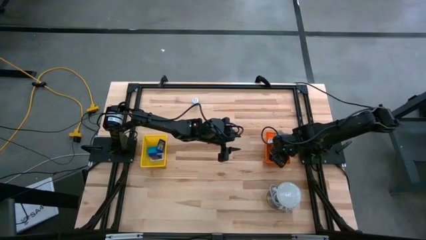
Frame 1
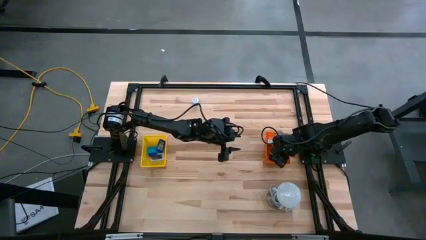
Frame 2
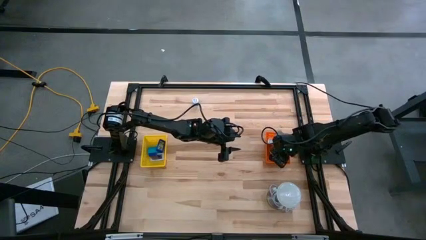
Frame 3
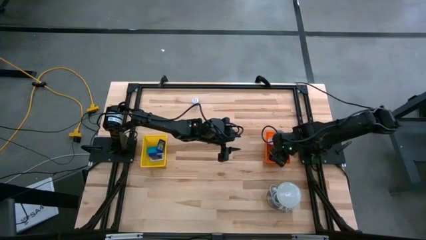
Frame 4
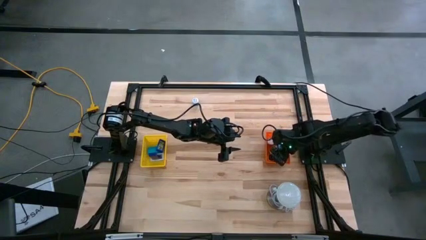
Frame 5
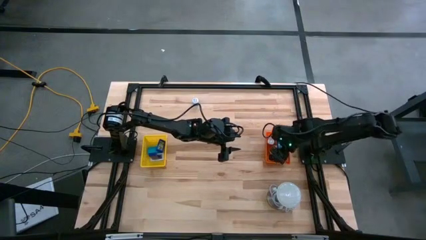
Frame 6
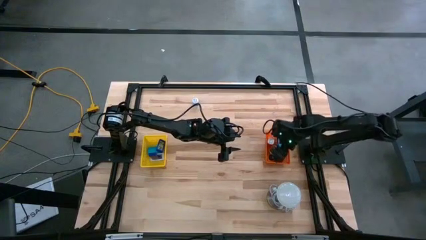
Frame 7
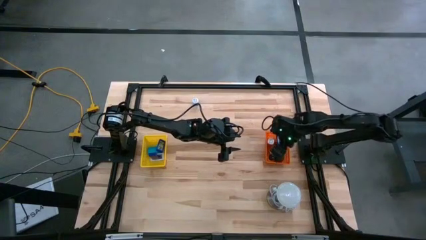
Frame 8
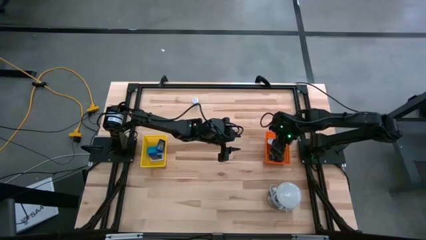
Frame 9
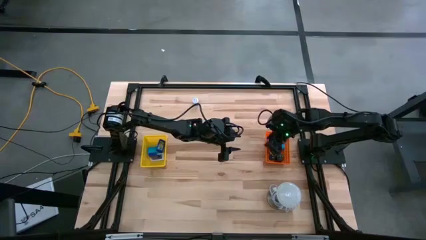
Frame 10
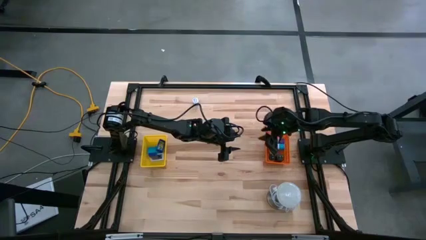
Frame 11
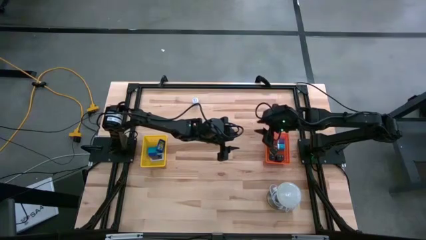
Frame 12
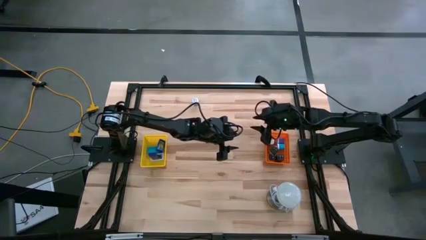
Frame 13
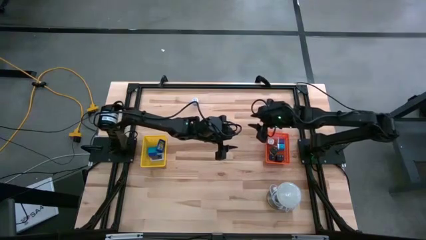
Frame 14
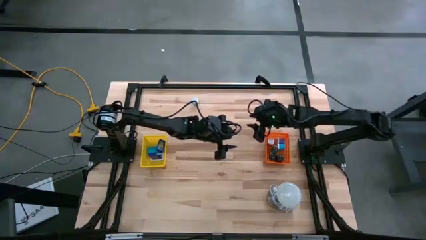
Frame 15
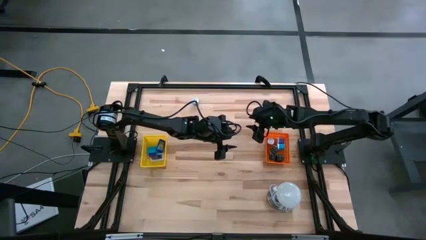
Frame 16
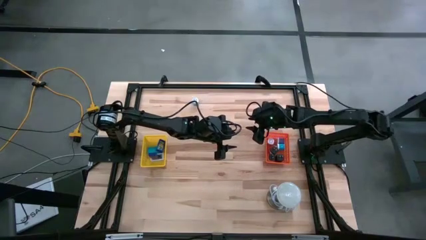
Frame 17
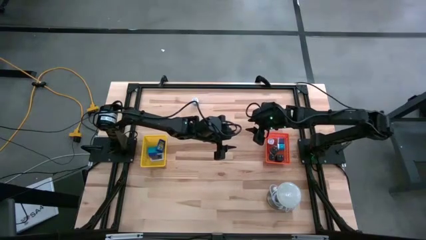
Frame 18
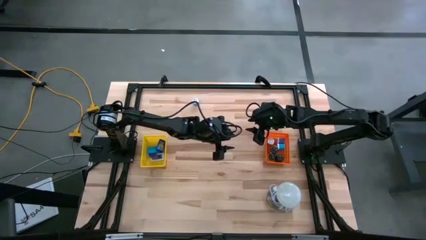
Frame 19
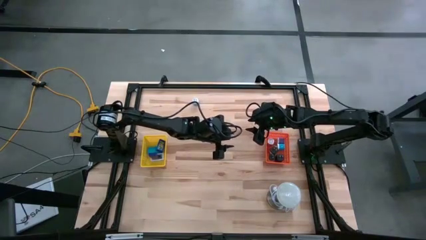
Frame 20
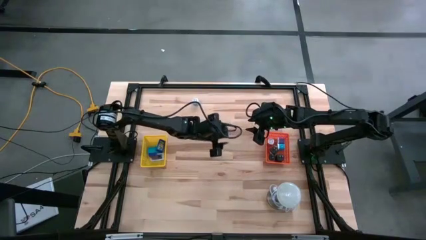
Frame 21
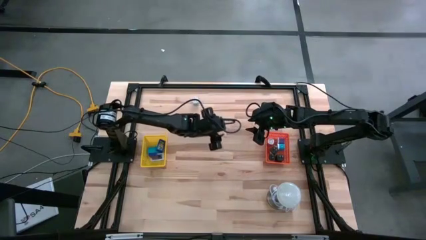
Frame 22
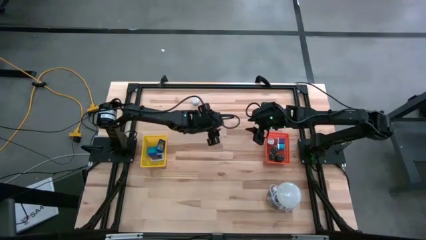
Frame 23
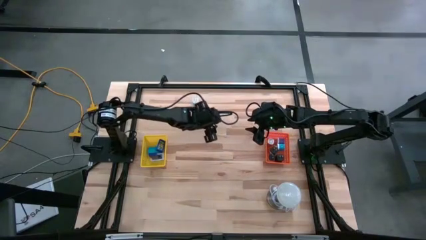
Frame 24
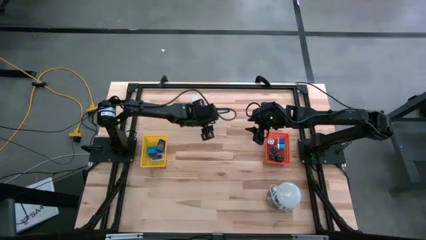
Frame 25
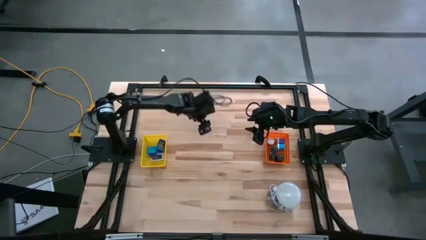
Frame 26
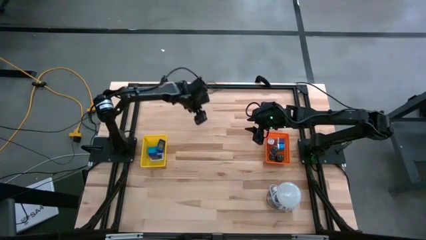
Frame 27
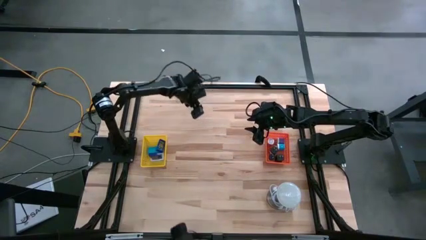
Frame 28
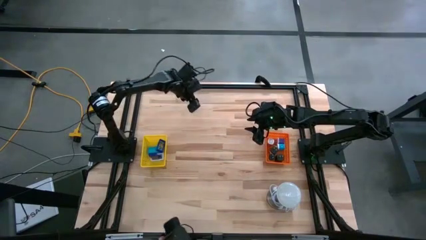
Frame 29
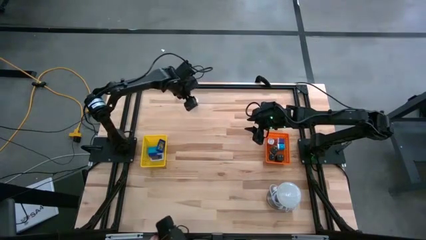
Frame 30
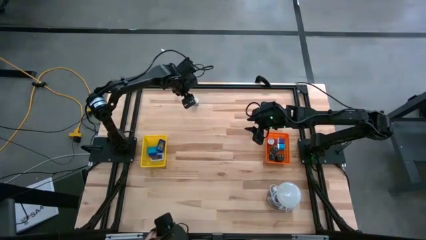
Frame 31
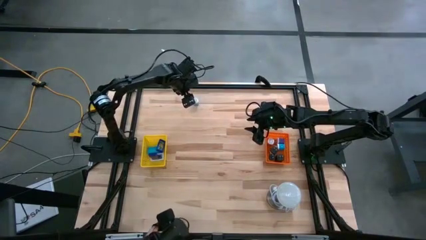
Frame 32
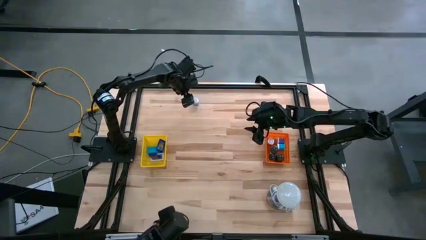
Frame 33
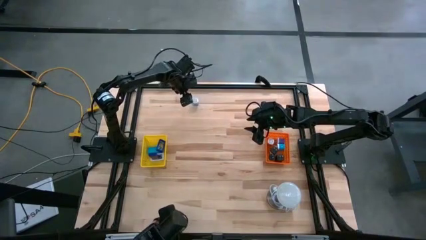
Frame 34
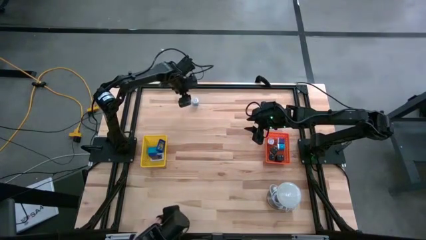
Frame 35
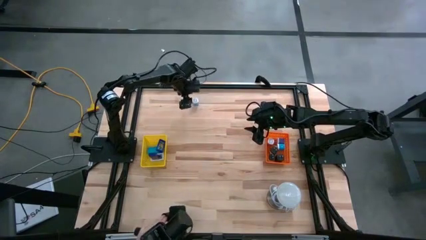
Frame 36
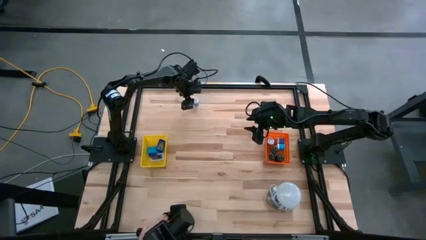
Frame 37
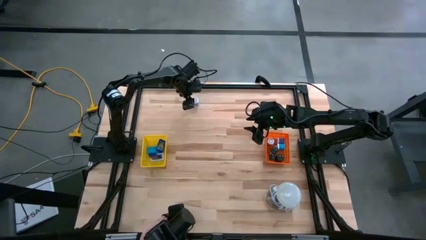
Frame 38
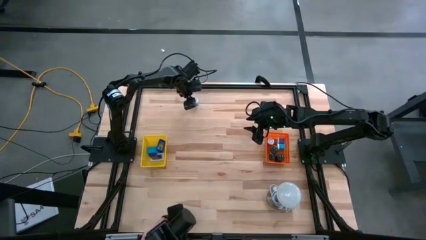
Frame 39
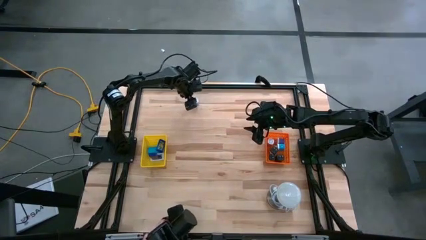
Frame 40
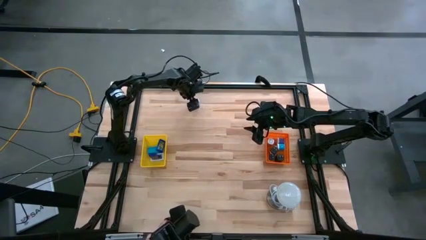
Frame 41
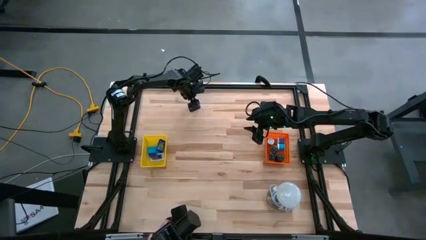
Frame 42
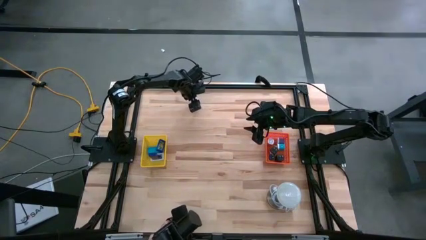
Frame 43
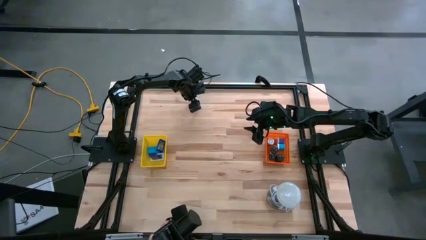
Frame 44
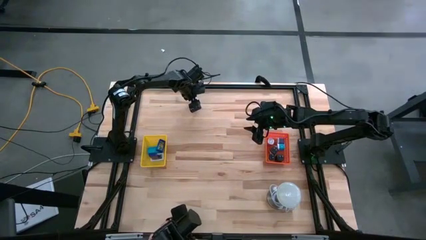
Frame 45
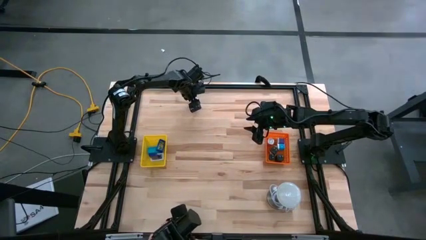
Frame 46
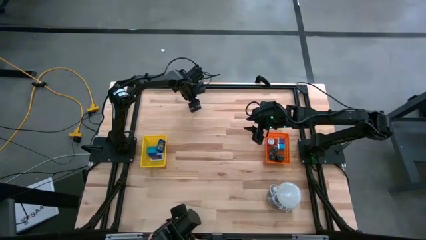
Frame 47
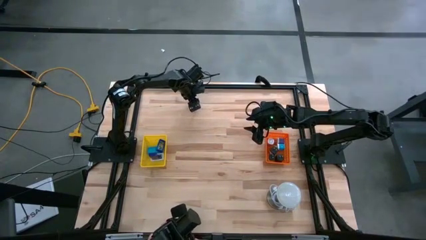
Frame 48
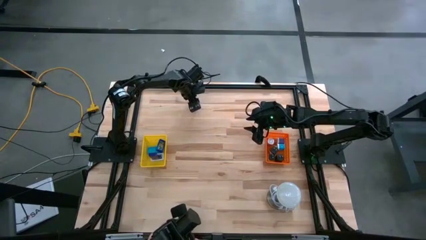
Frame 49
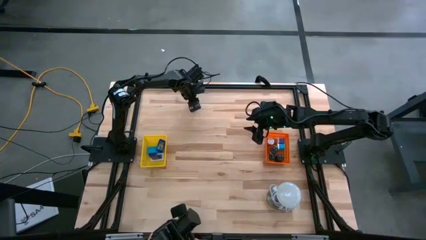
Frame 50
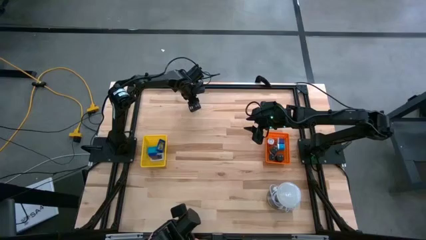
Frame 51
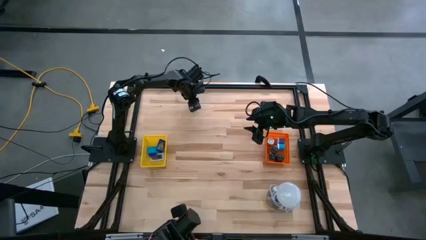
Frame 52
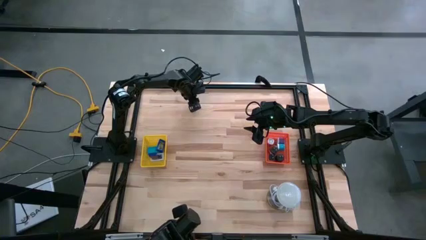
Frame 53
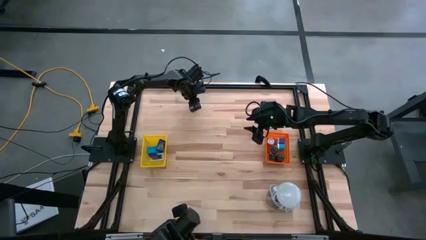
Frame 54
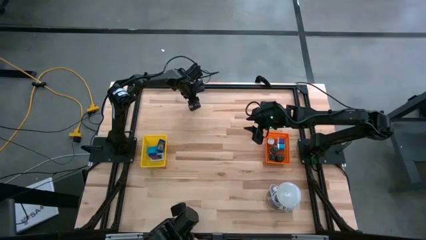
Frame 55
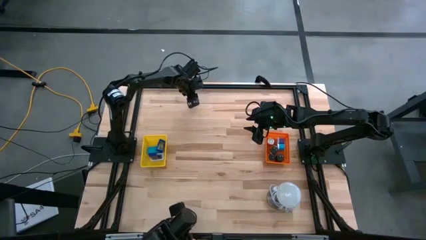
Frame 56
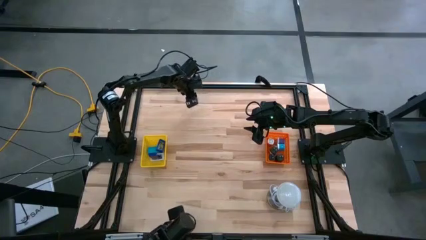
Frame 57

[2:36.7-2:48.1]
Task: Pick & Place Office items
Put the blue white charger adapter into the orange bin
